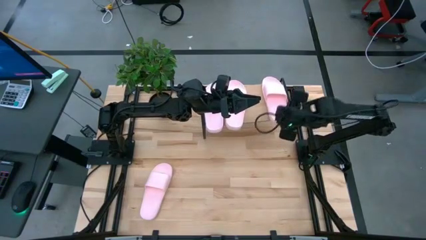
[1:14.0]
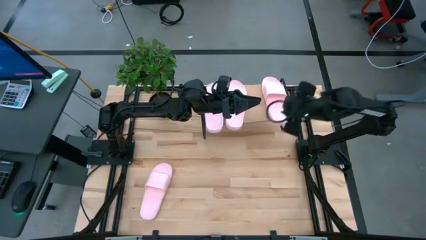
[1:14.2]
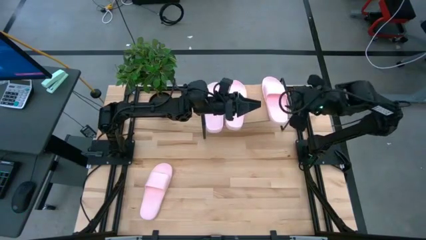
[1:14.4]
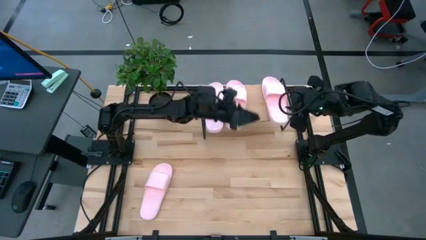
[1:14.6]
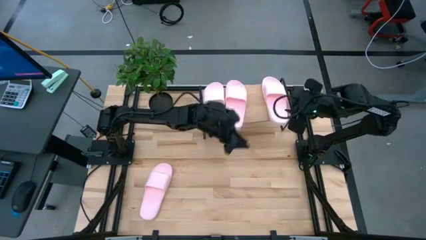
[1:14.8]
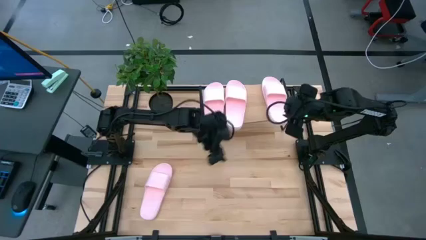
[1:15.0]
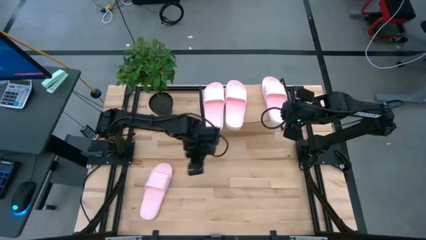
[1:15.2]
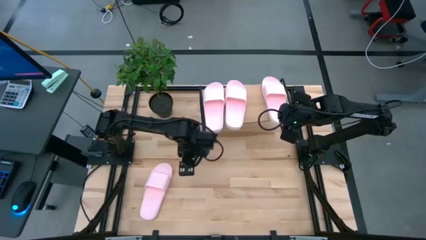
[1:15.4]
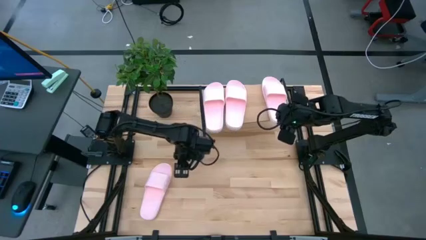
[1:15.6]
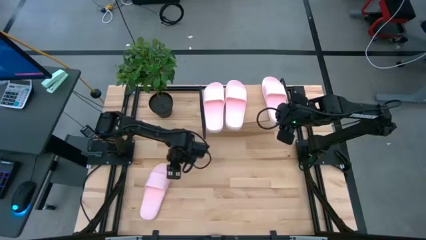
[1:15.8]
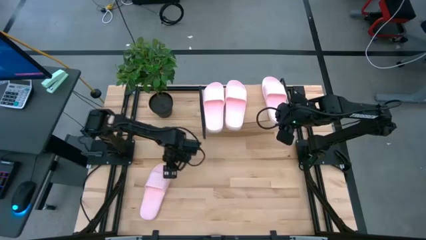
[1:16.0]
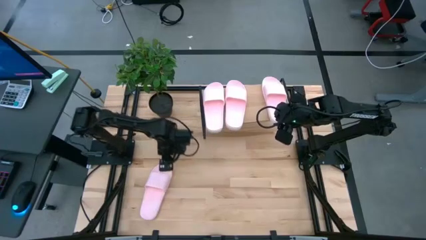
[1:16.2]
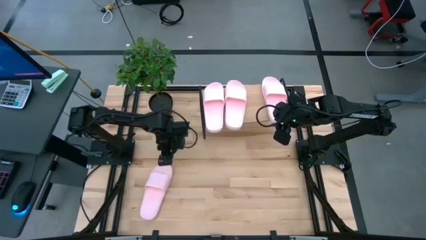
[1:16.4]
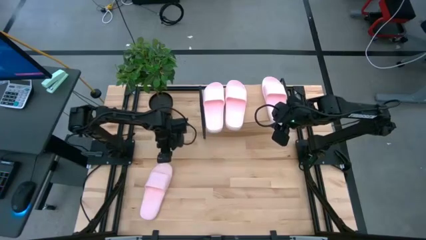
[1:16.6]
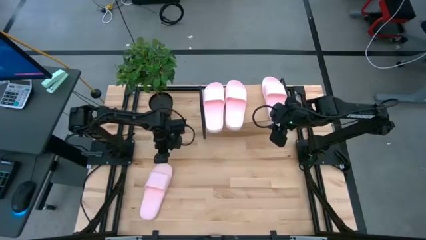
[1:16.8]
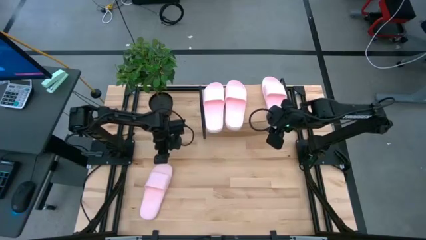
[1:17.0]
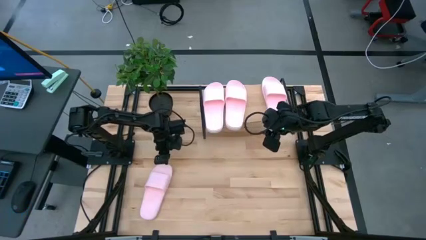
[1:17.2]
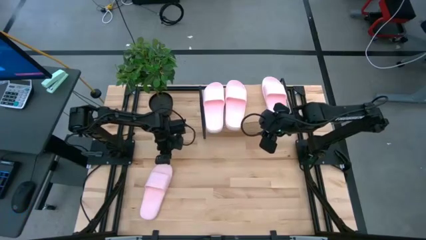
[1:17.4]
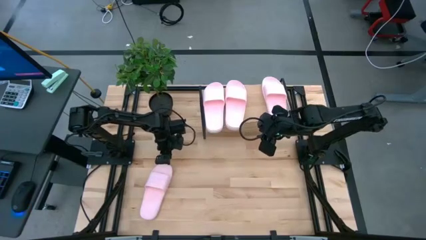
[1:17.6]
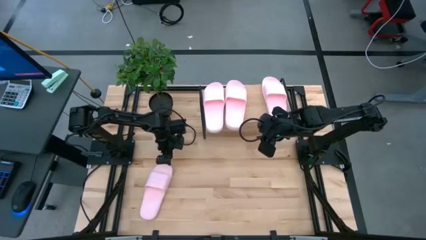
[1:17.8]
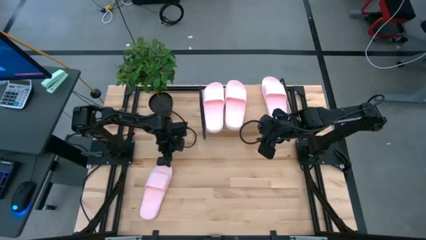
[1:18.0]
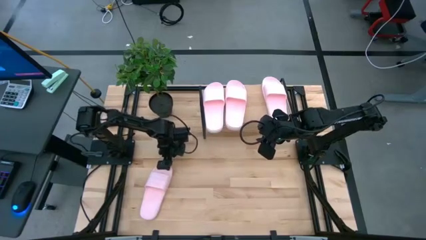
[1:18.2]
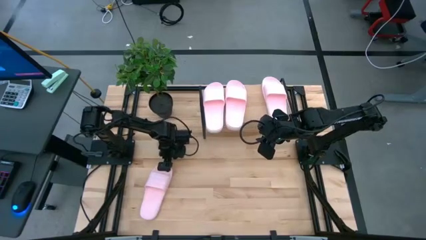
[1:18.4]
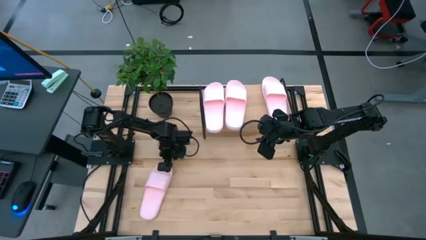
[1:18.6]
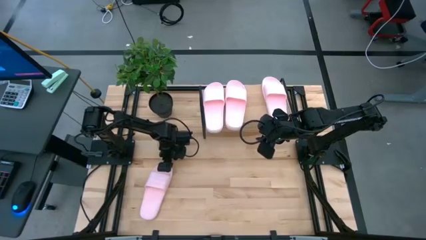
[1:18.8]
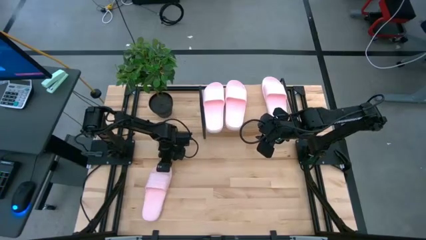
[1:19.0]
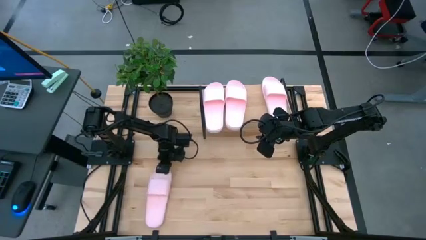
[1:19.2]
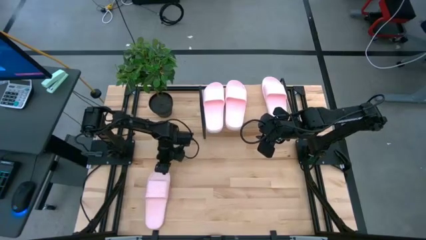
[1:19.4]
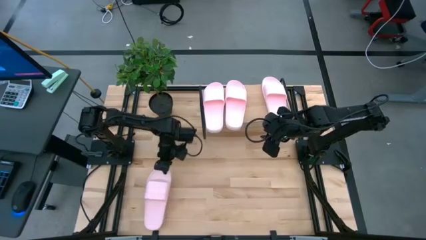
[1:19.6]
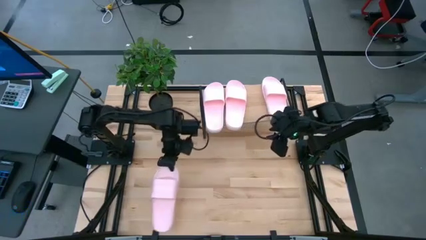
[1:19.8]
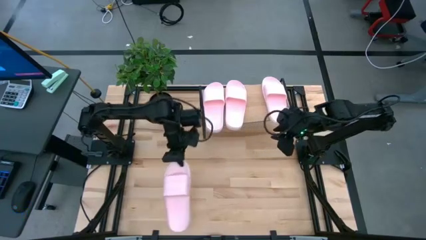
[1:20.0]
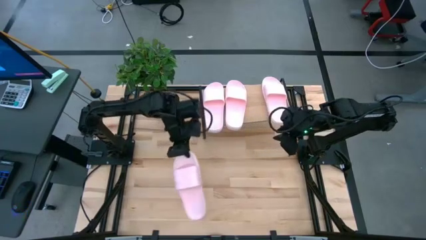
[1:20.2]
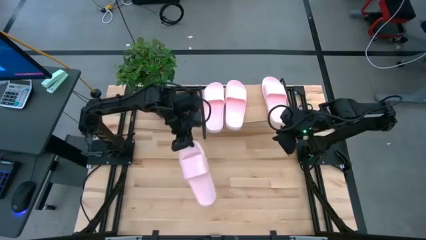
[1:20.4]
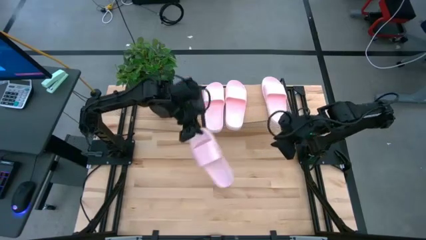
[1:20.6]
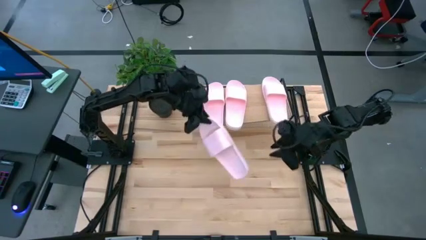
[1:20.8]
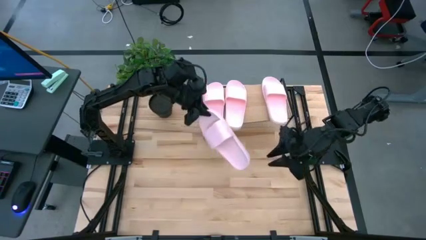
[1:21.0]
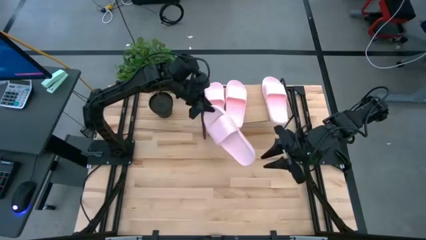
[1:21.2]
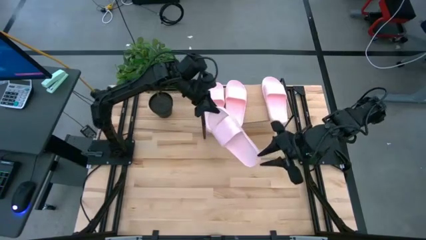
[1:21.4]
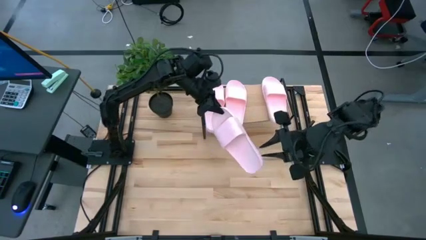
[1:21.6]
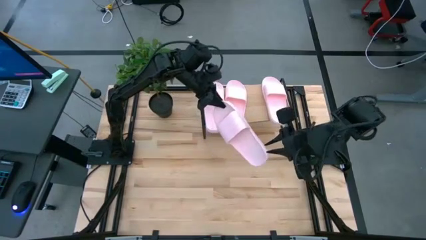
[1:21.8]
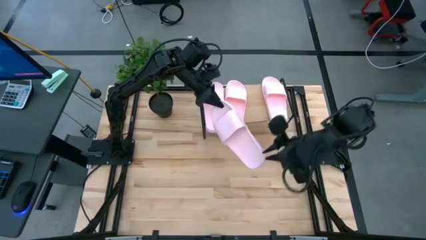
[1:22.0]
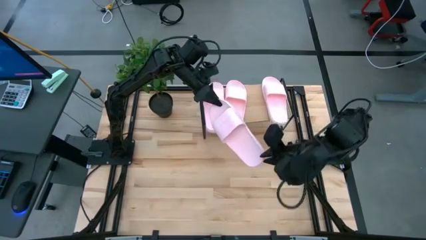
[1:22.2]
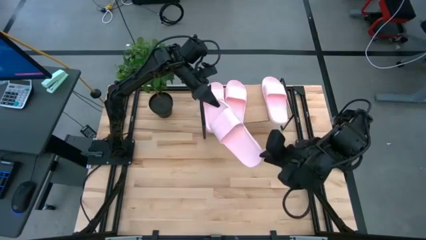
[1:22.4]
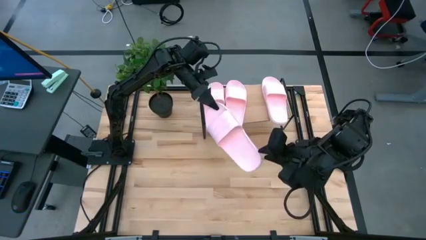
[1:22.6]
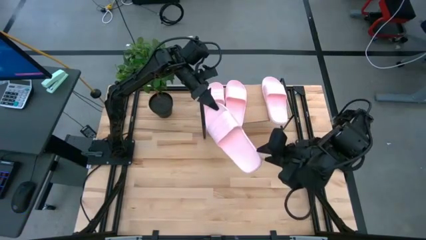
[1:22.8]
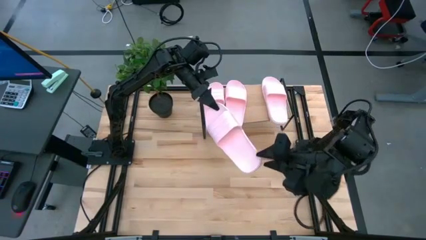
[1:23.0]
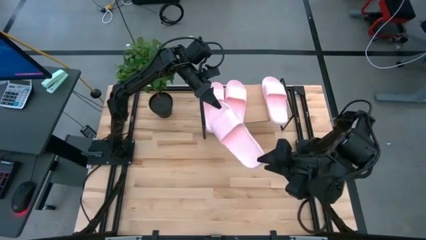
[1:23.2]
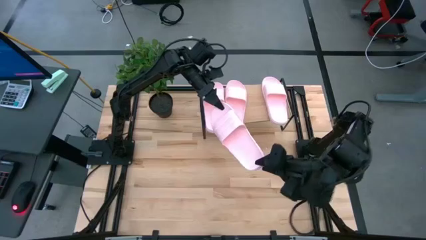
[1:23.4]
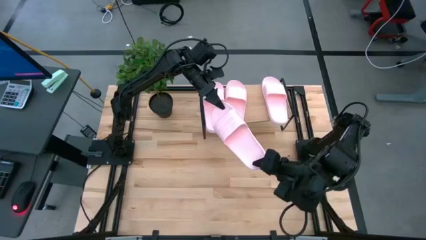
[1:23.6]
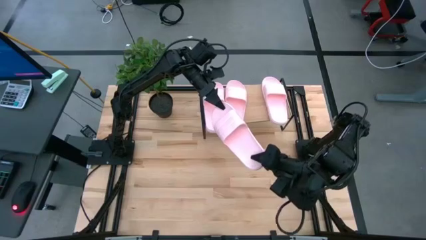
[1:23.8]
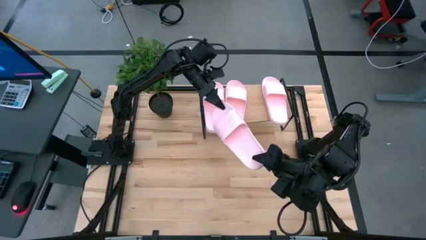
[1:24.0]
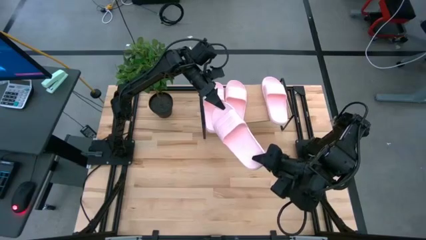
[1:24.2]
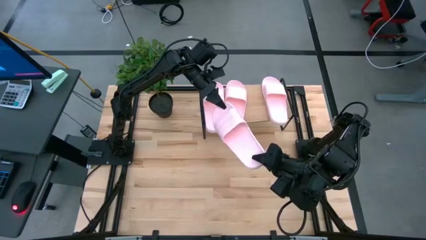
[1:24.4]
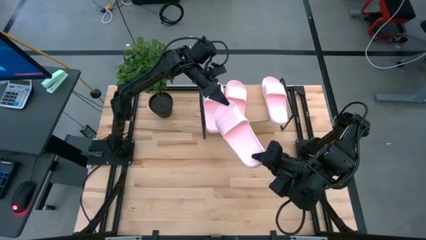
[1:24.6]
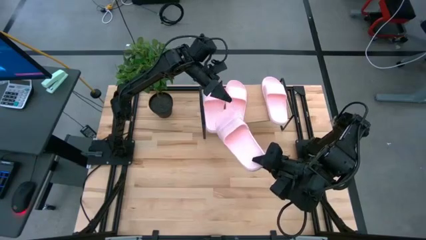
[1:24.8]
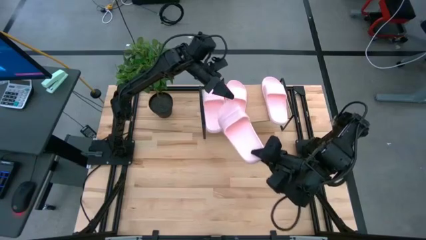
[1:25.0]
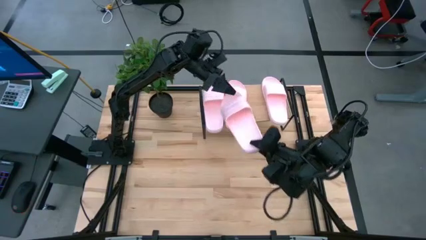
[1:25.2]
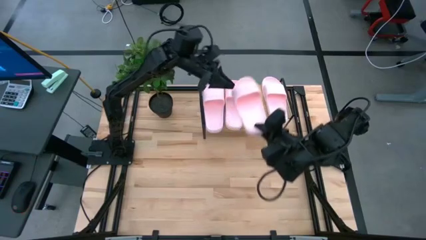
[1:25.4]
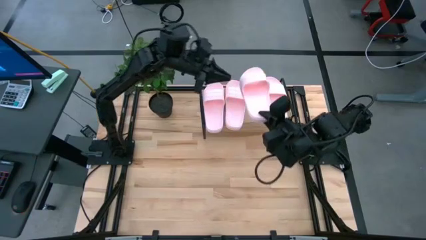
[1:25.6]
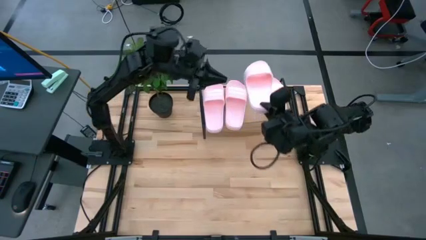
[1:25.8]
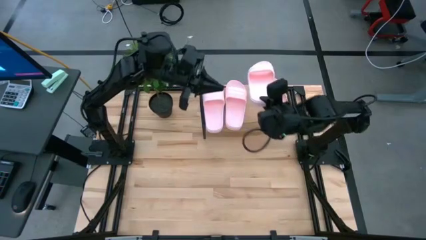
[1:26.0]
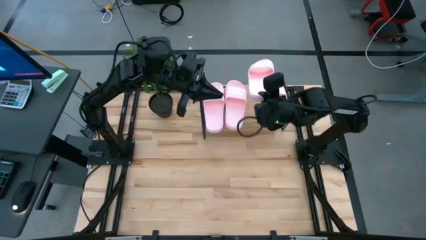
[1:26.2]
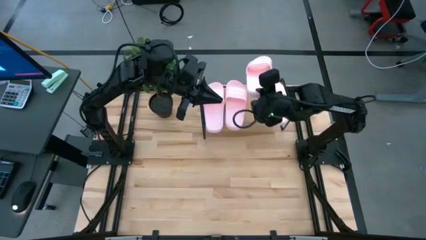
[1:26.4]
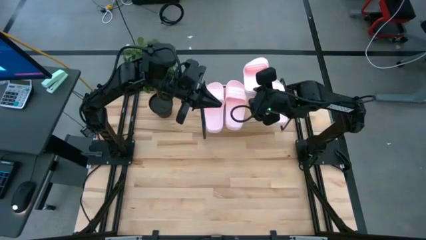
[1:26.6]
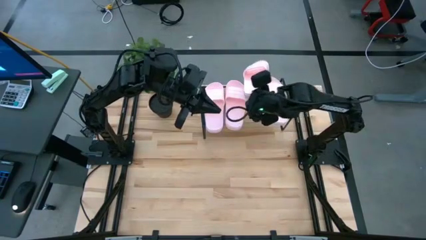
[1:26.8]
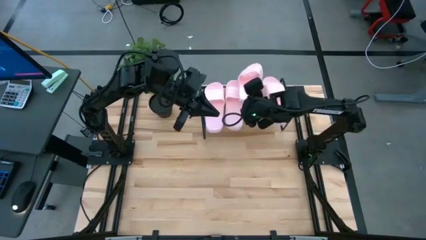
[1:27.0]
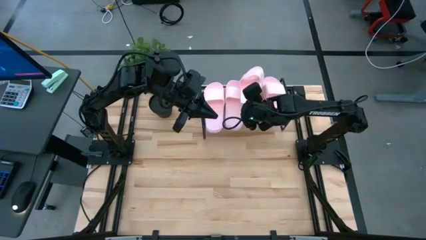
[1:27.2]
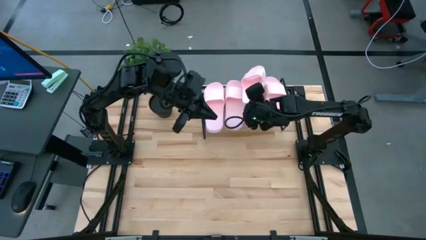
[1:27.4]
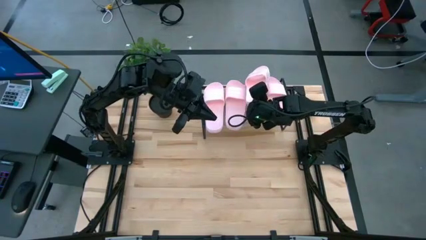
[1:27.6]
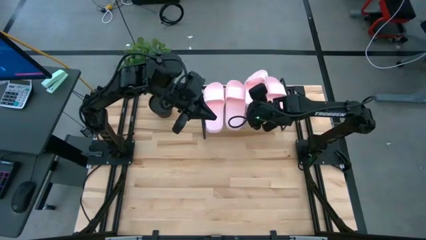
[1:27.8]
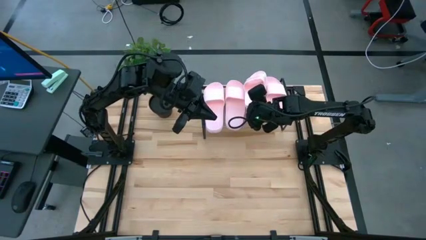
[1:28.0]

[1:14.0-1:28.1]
Task: Pick and place slides into the shelf
Put the pink slide on the shelf
